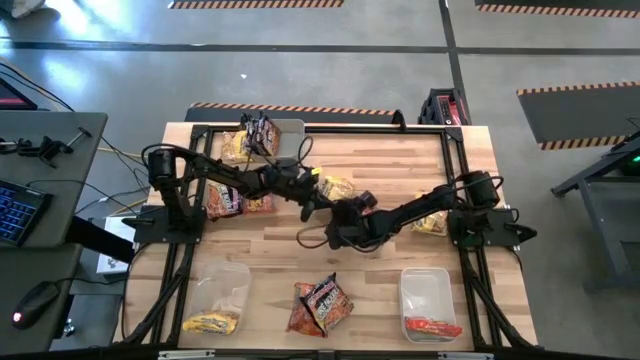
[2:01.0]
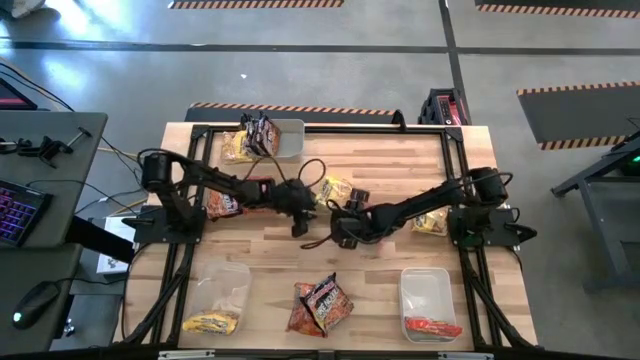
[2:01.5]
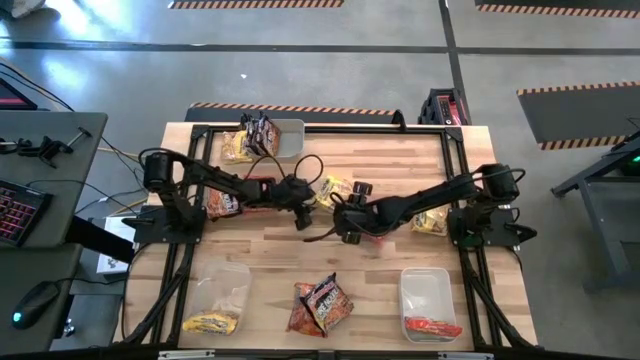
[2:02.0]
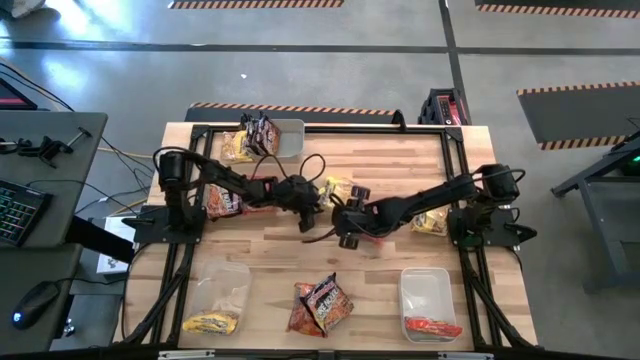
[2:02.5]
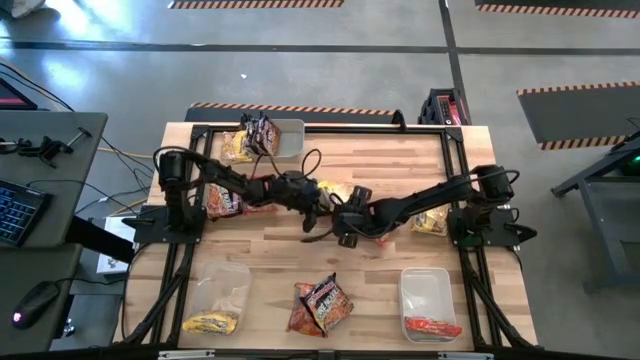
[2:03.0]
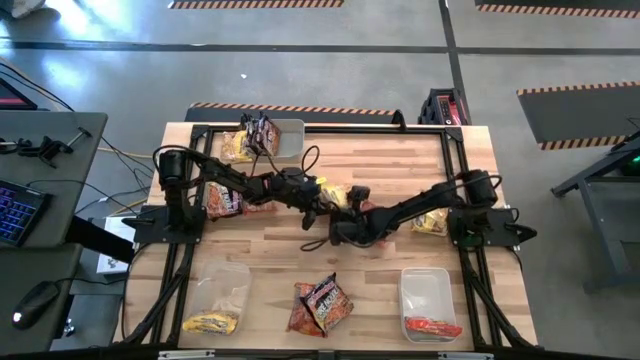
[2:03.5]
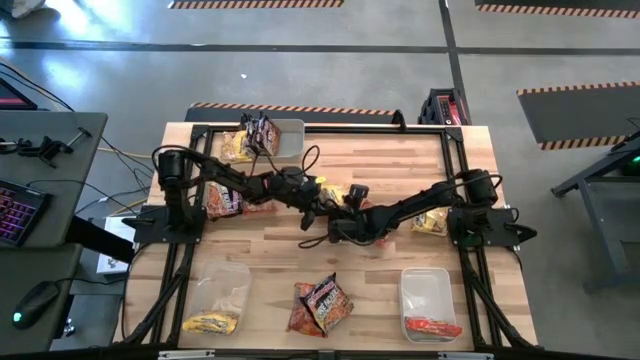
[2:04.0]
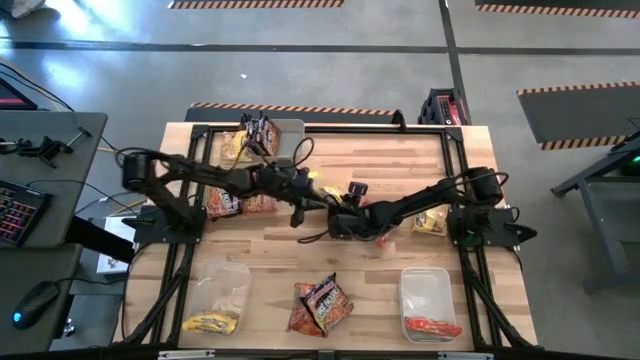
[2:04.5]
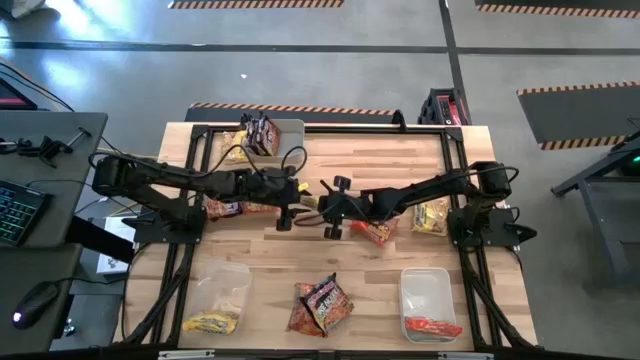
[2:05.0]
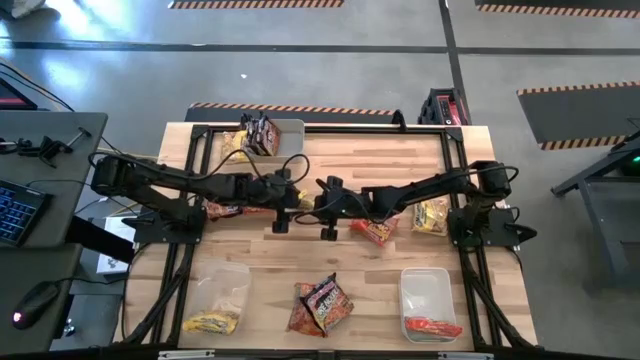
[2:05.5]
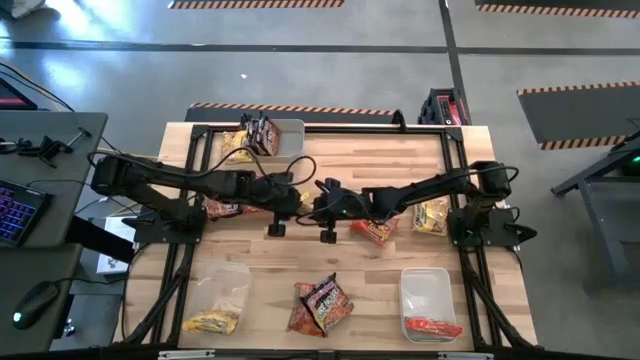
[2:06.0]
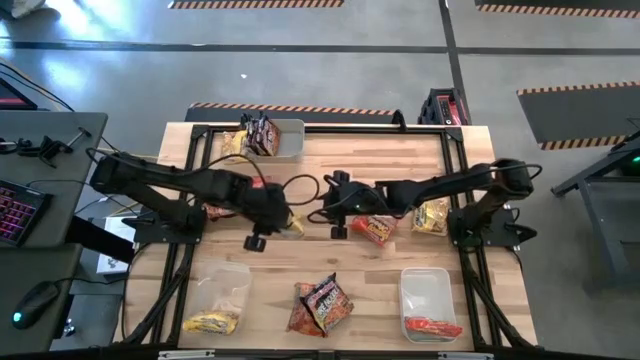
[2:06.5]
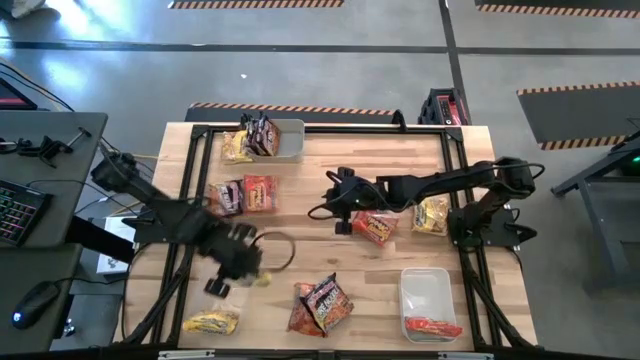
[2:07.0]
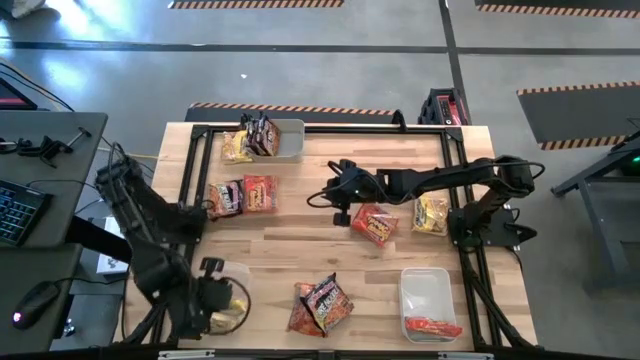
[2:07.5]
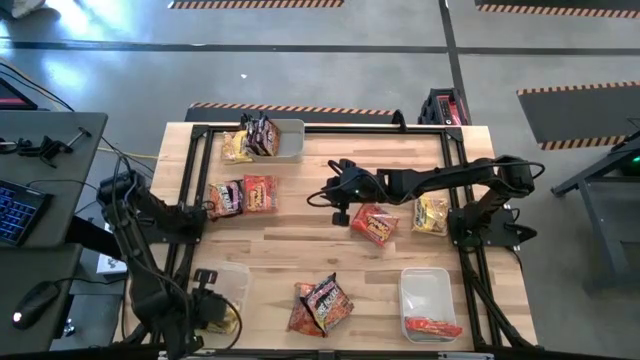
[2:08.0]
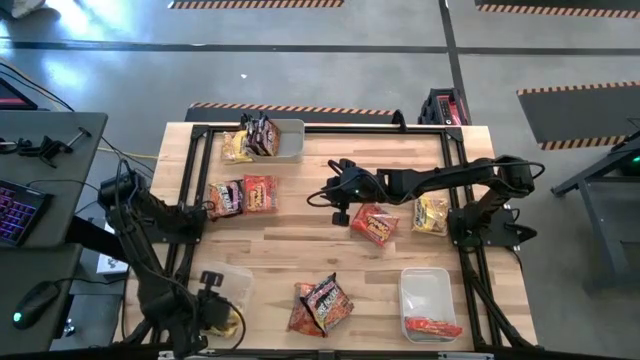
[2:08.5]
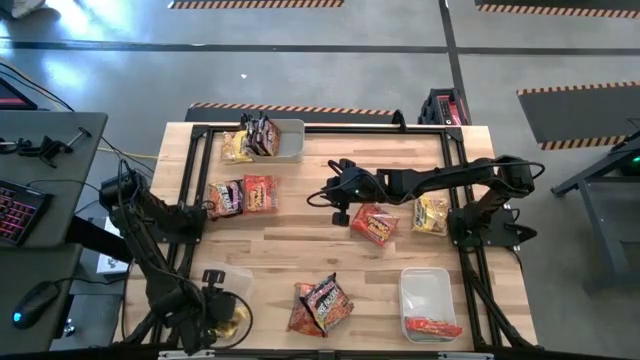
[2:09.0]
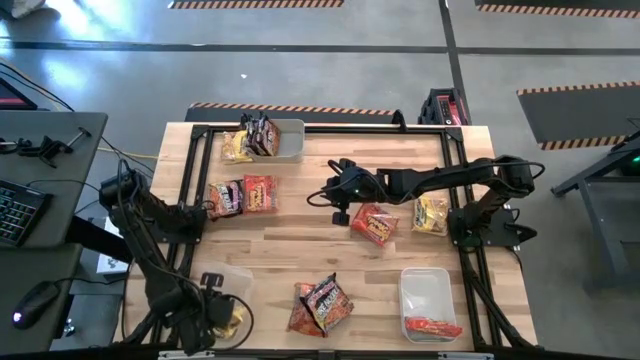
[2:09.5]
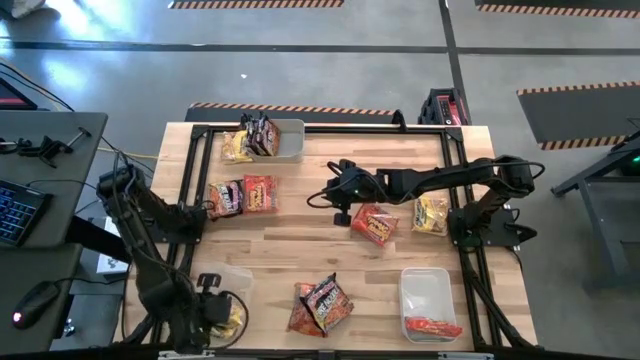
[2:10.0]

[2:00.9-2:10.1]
Task: Sort Maruchan noodles
Put the middle yellow noodle pack into the transparent bin

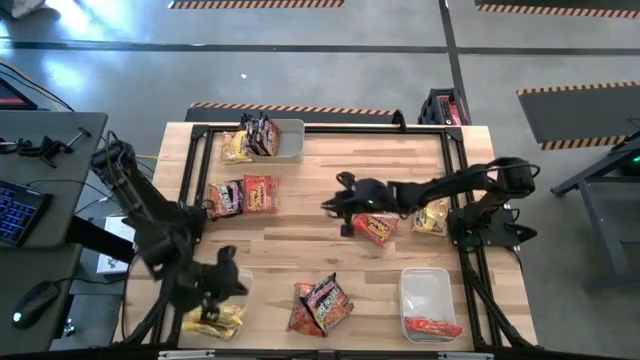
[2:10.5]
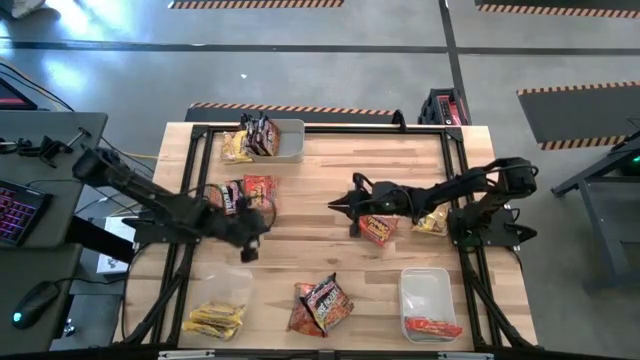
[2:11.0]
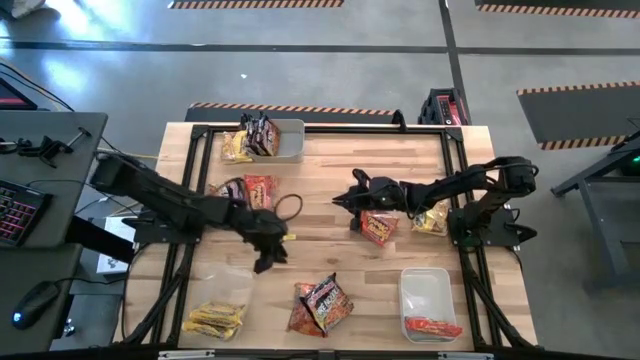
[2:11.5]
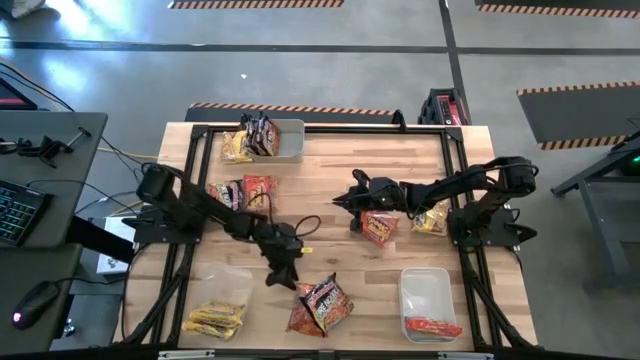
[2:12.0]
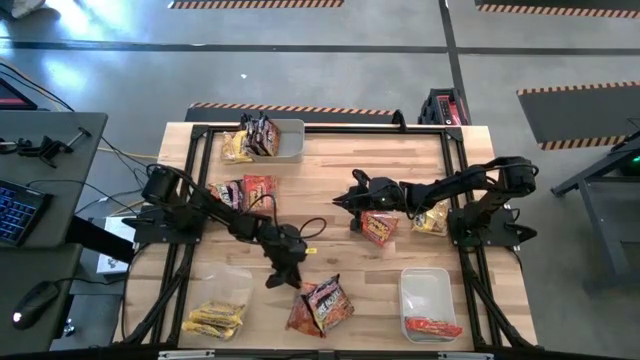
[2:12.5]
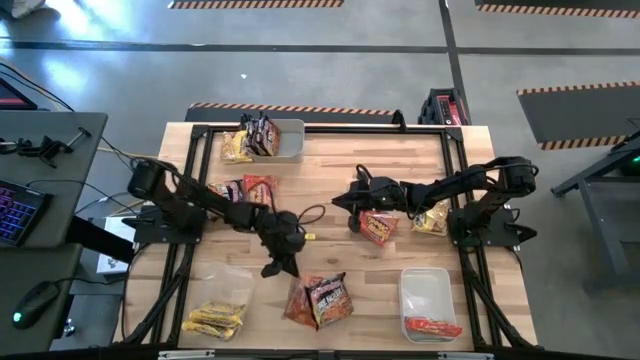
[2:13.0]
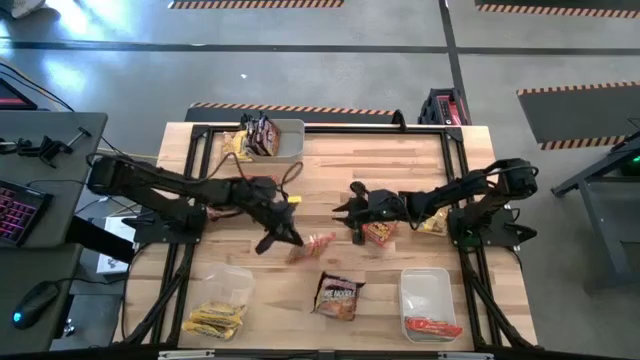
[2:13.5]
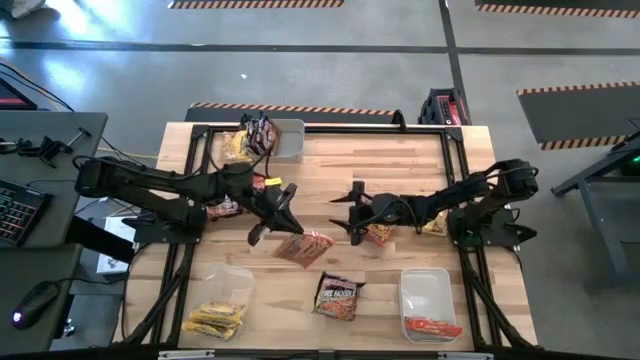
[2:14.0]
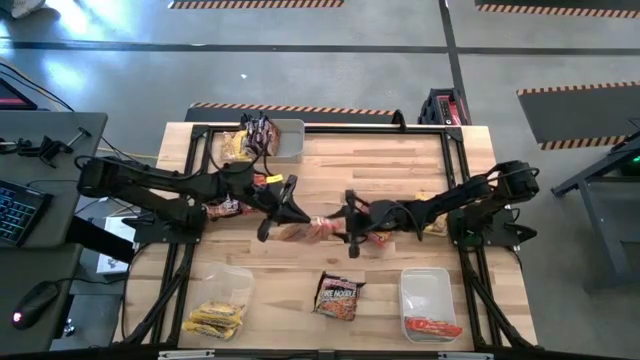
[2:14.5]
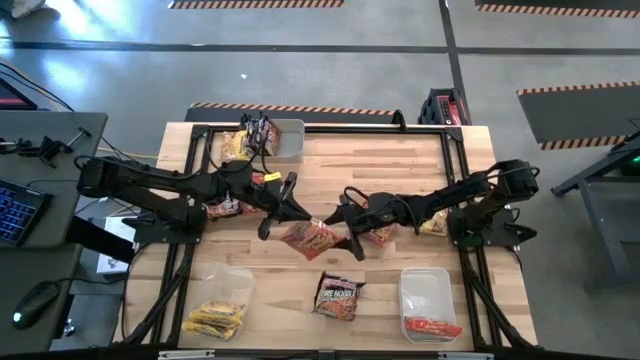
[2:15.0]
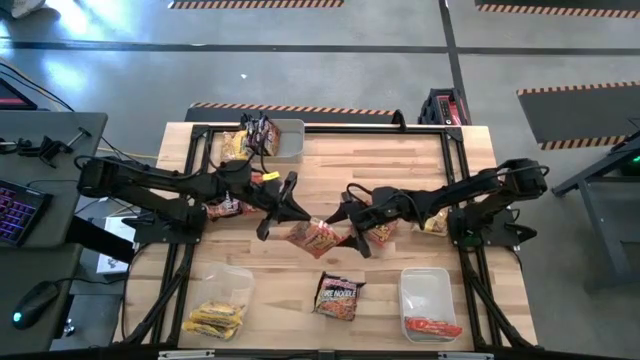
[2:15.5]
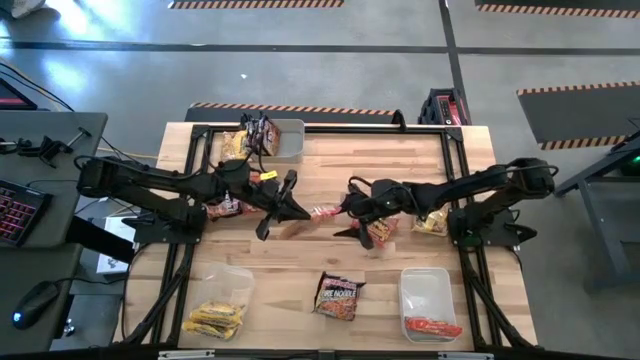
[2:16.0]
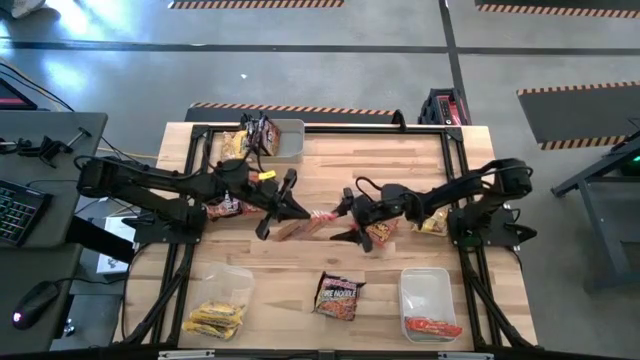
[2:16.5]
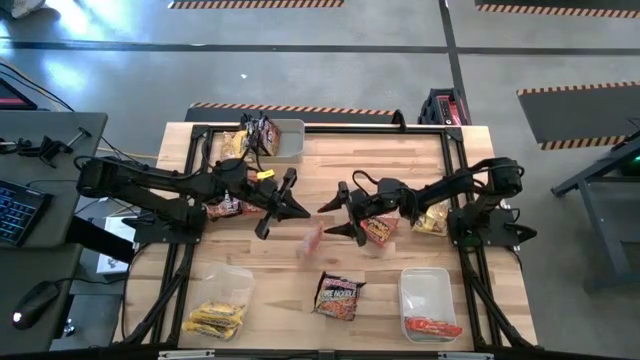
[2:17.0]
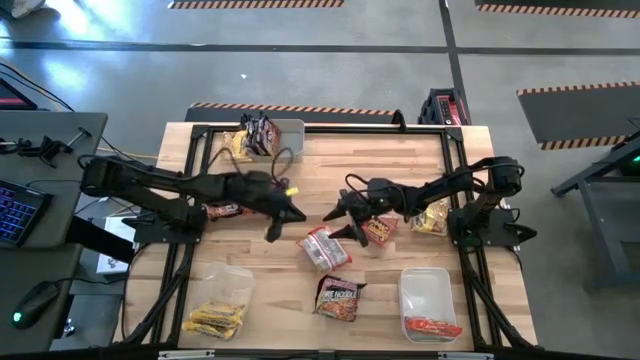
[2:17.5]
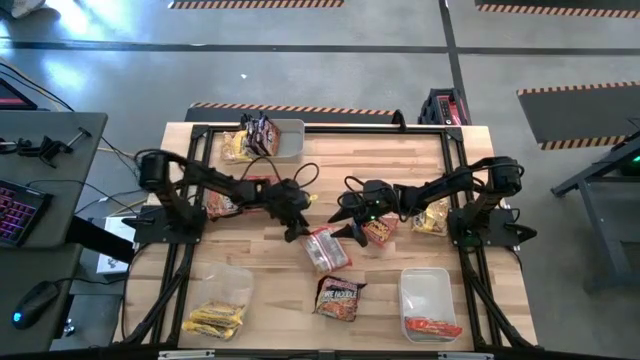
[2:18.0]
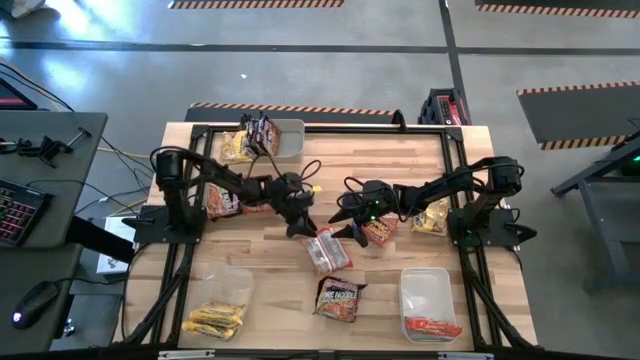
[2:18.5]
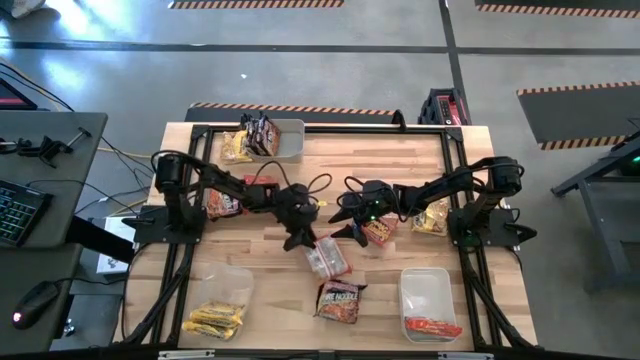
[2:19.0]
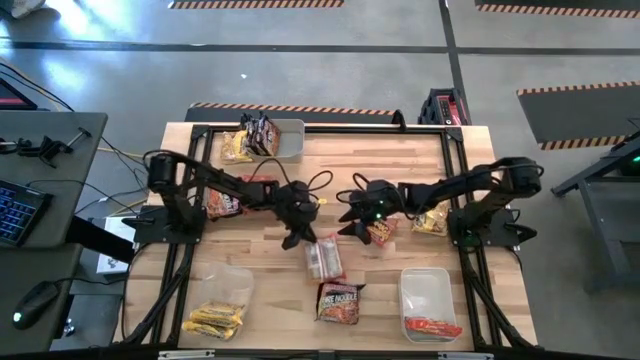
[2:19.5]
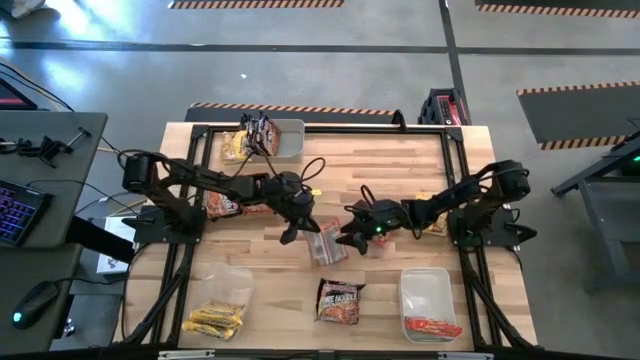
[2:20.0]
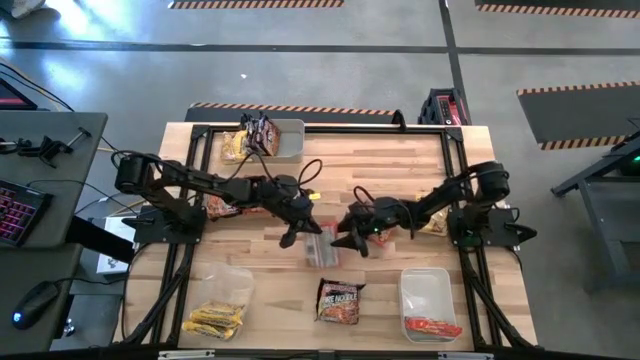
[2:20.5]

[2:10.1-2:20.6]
Put the bottom orange noodle pack into the white bin
